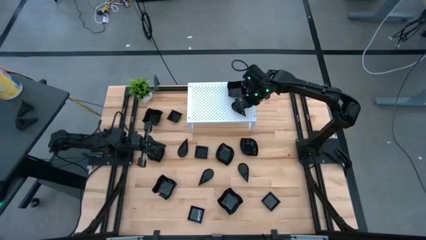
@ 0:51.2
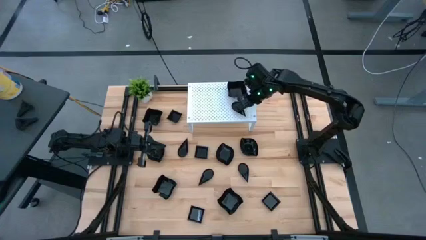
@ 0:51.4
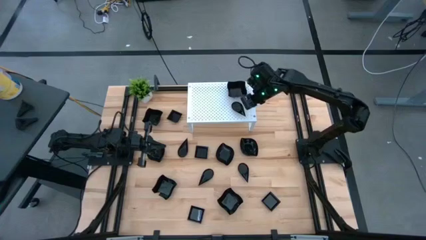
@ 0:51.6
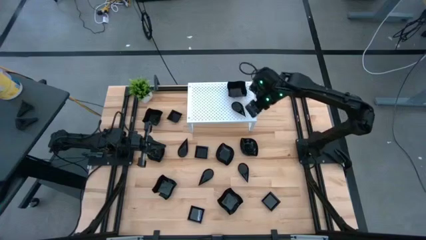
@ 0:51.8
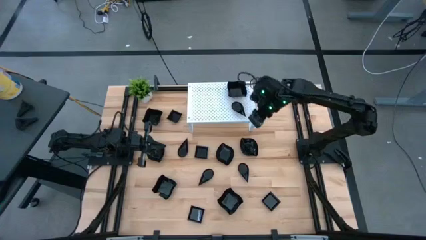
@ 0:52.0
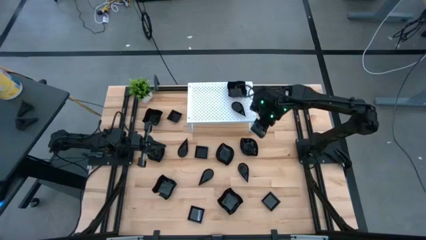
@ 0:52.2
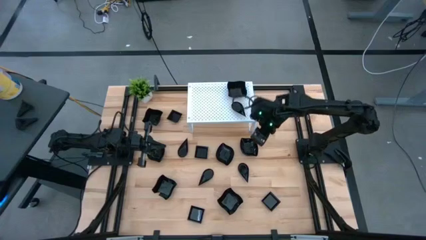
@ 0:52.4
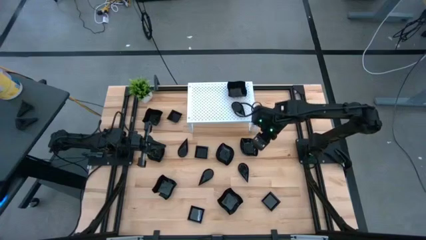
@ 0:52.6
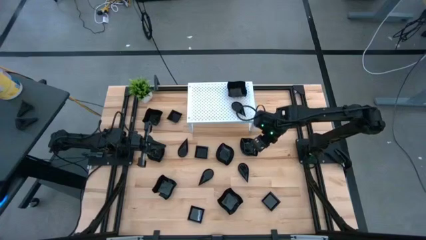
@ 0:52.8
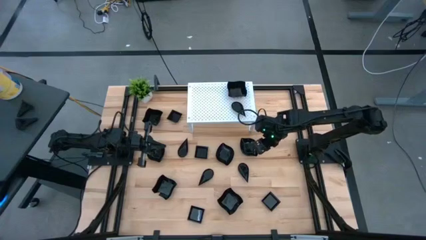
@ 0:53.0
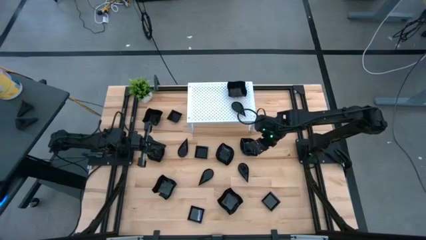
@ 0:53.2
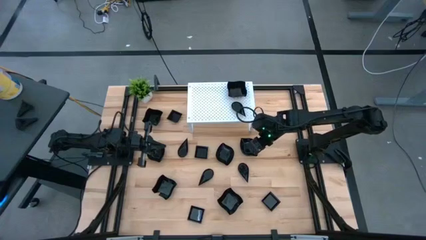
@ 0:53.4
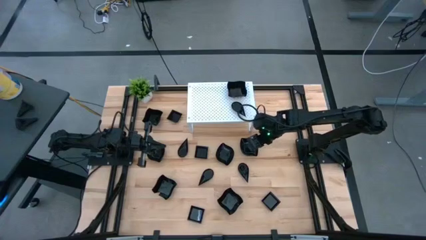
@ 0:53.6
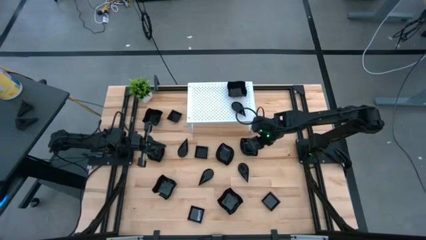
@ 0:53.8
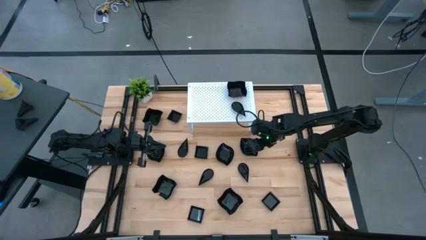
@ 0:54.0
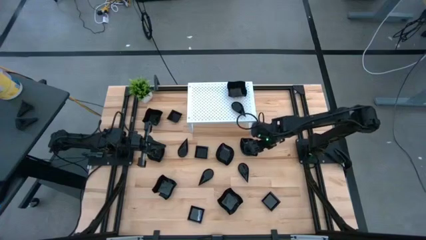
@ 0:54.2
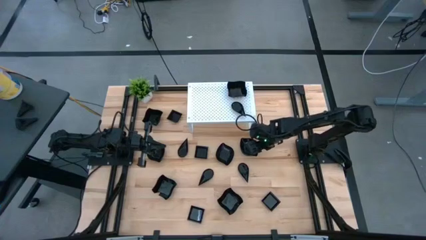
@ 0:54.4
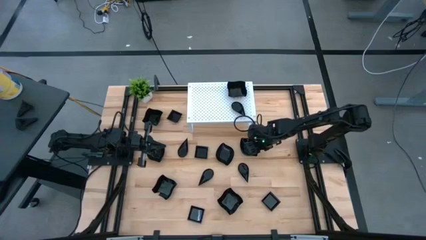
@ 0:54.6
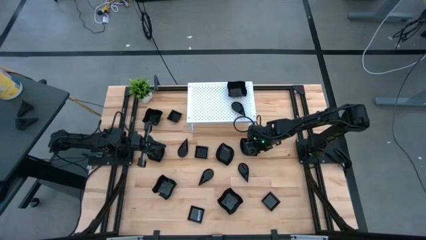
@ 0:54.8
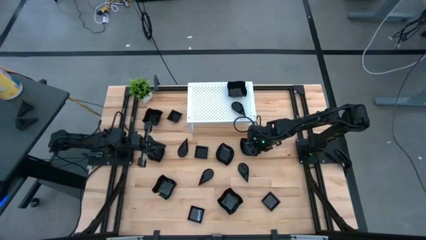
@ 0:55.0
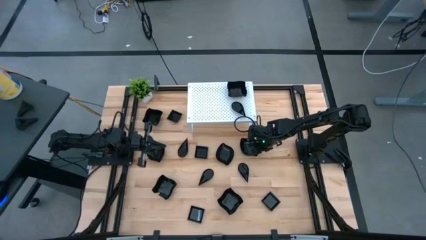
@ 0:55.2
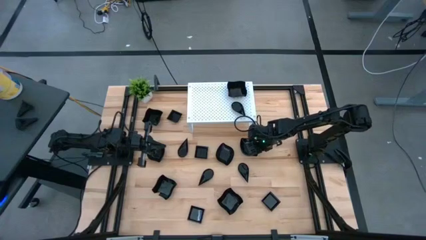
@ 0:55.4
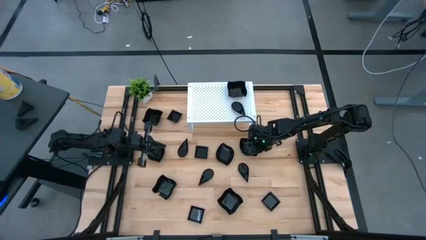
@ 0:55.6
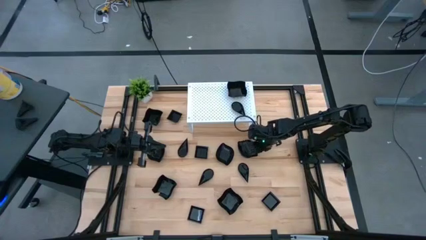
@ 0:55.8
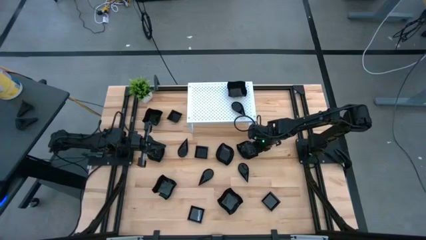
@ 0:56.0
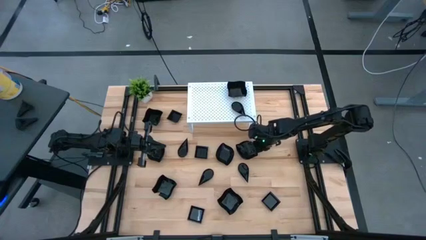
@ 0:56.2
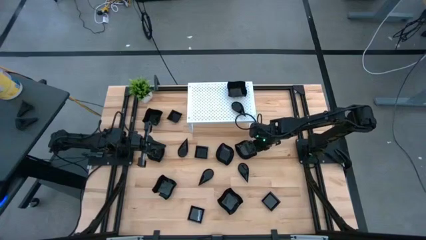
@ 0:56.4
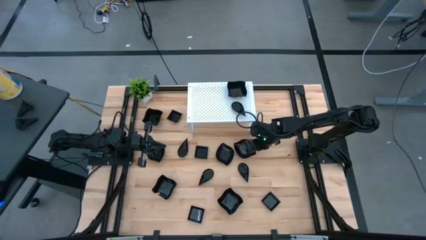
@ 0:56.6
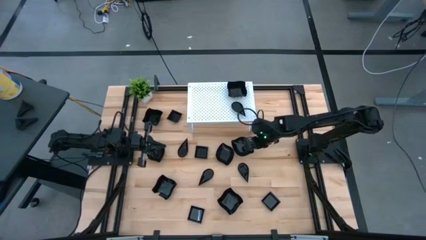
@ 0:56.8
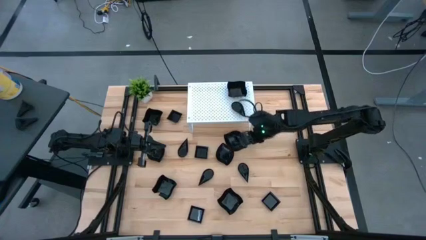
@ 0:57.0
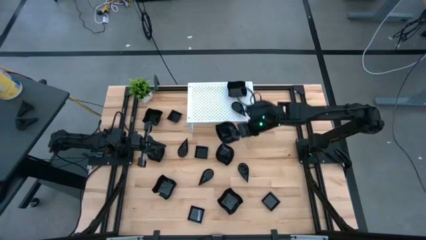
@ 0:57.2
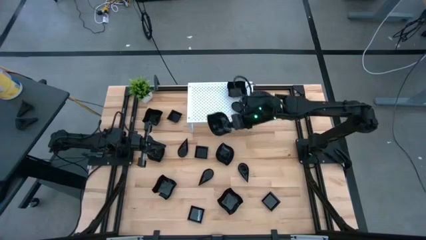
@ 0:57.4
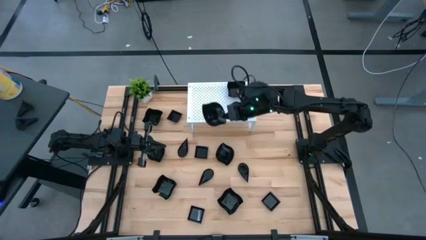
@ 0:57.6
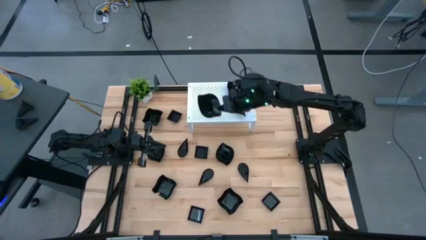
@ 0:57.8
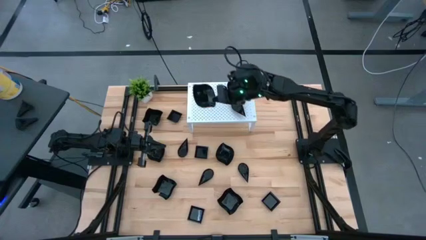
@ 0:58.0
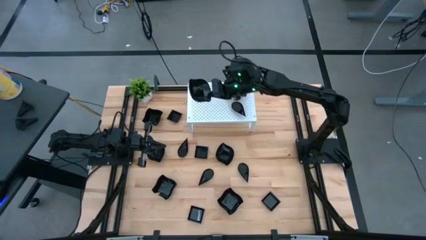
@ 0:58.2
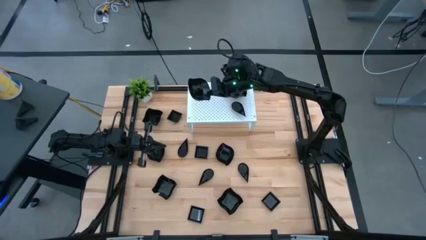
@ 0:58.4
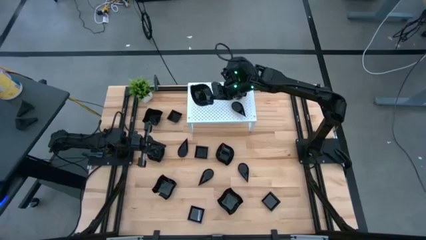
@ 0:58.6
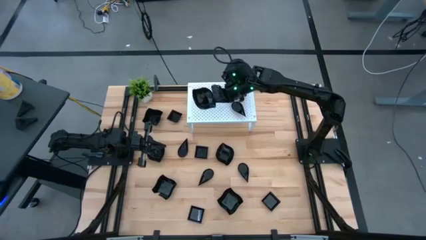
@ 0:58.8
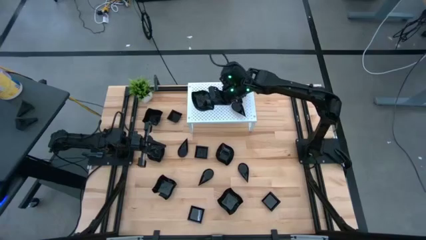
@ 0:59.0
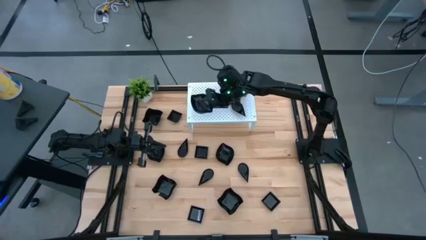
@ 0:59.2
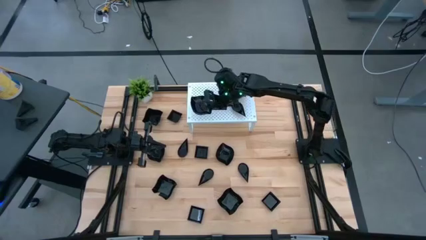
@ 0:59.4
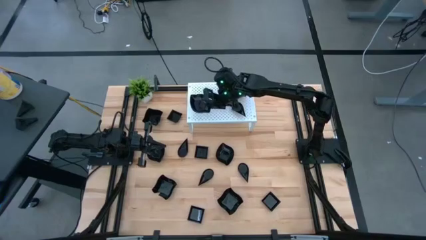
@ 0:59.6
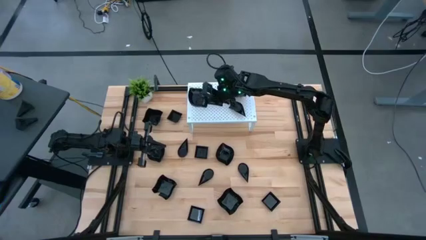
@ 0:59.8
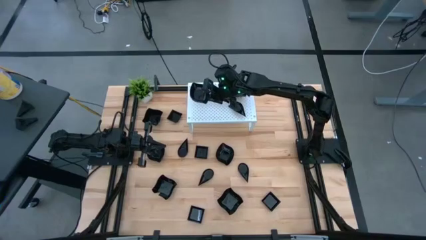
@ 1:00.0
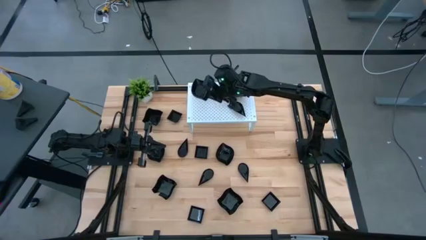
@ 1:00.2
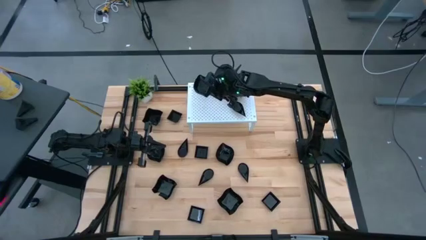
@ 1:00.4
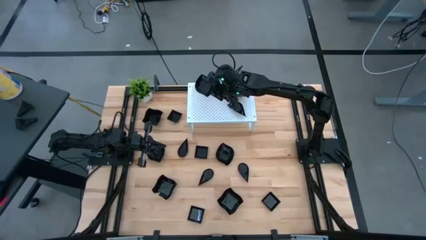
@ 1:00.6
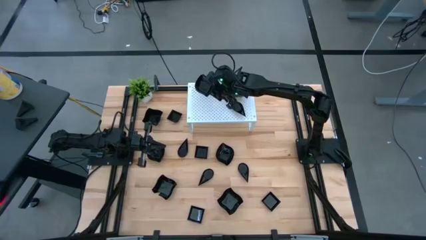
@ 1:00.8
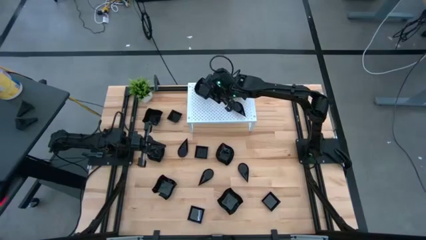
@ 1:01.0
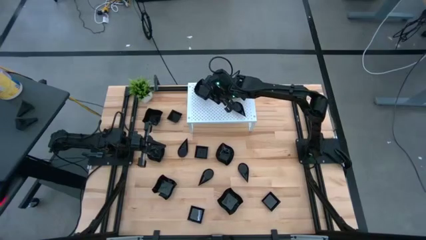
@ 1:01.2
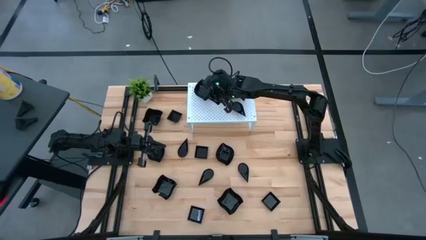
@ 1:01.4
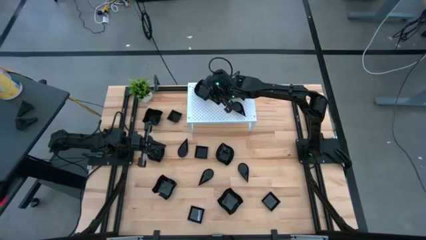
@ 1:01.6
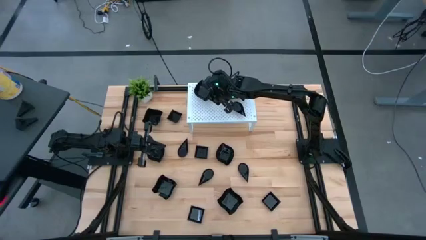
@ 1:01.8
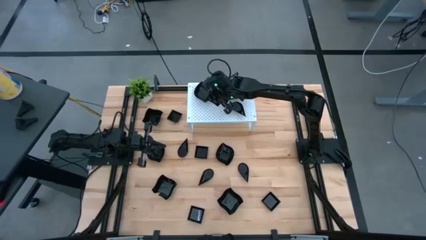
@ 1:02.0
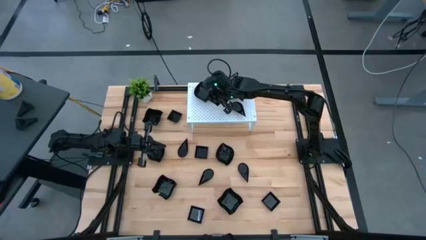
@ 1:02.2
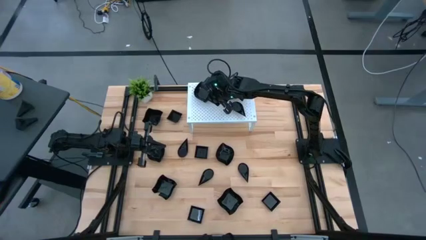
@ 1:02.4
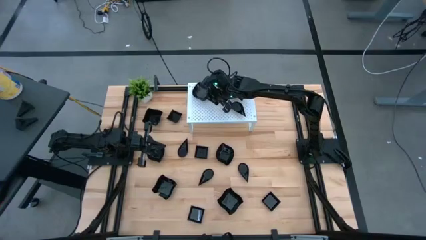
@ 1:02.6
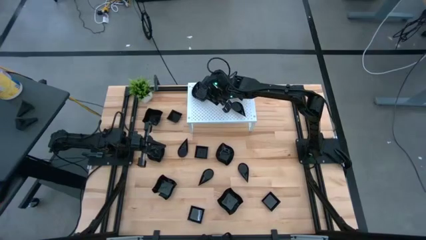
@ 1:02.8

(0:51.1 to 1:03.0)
Task: Pick & Place Mini shaped plates
Put the leaf-shaped plate on the shelf
